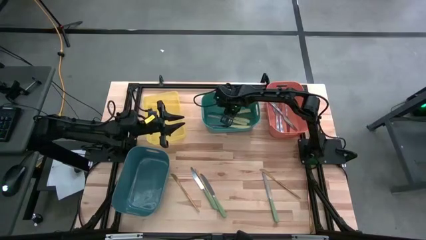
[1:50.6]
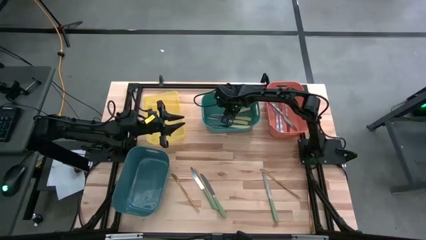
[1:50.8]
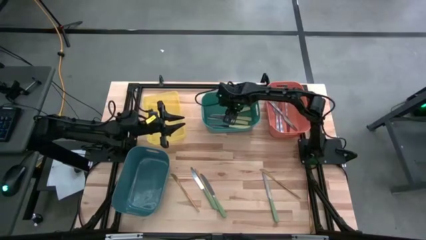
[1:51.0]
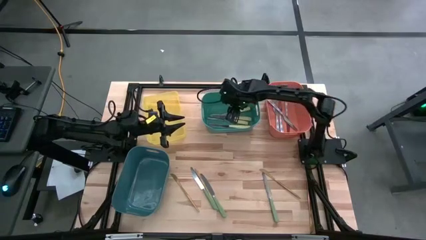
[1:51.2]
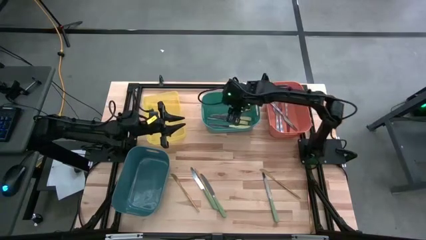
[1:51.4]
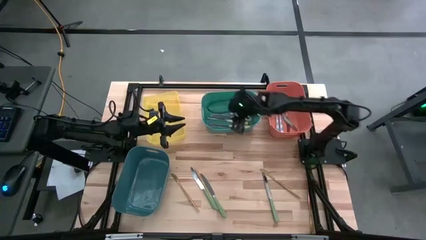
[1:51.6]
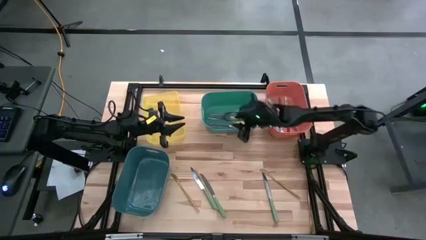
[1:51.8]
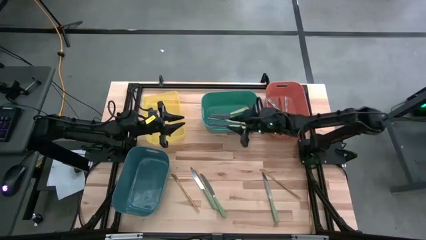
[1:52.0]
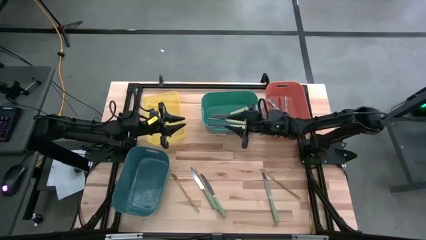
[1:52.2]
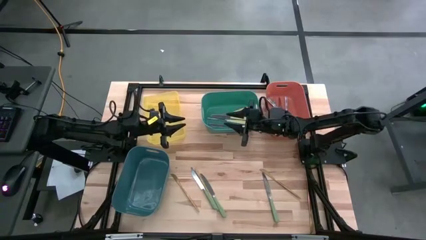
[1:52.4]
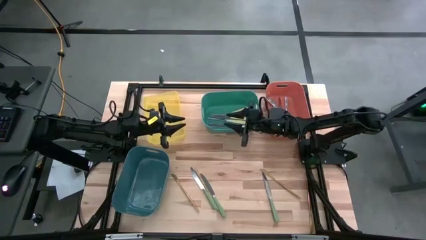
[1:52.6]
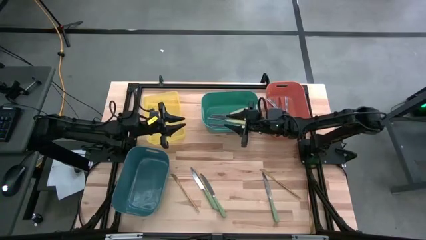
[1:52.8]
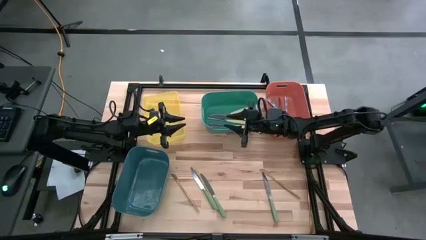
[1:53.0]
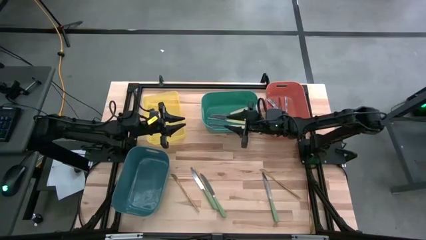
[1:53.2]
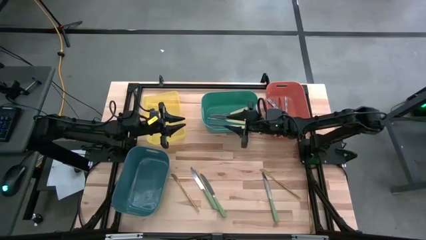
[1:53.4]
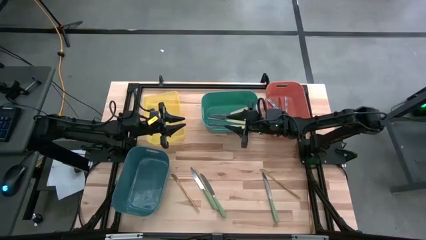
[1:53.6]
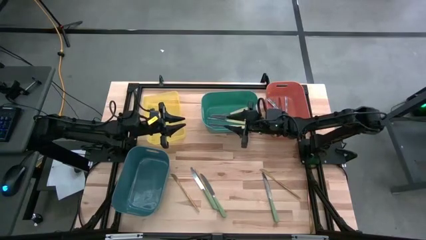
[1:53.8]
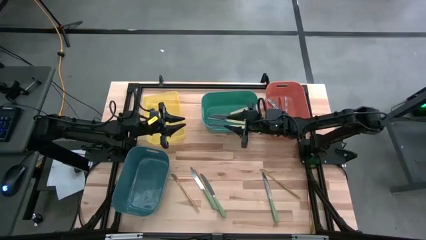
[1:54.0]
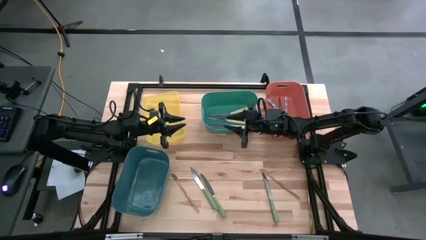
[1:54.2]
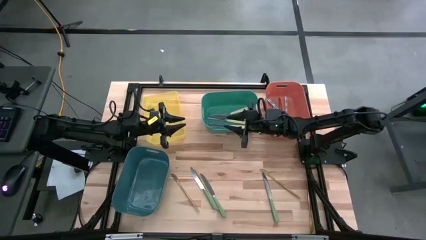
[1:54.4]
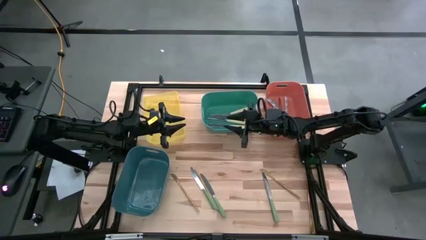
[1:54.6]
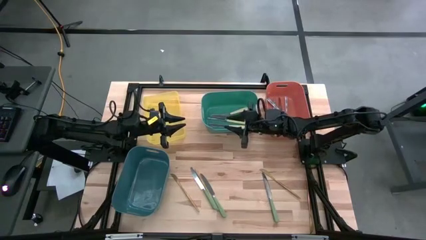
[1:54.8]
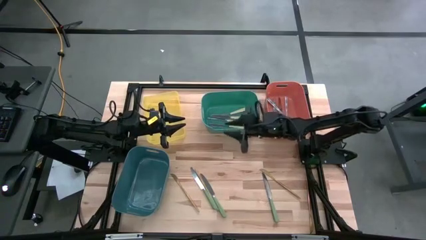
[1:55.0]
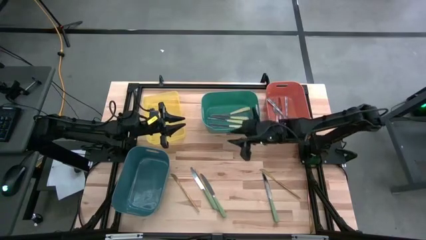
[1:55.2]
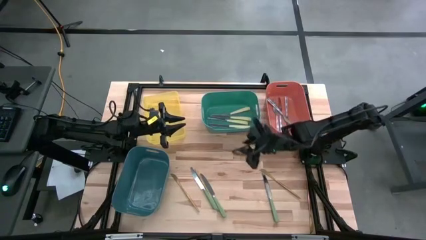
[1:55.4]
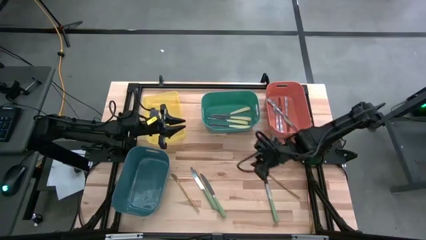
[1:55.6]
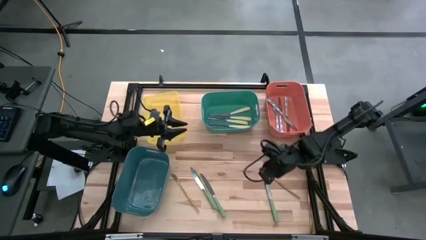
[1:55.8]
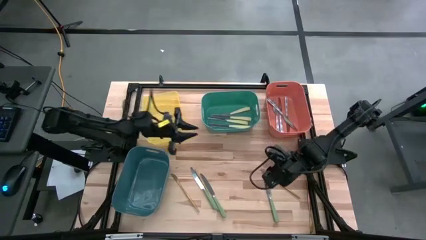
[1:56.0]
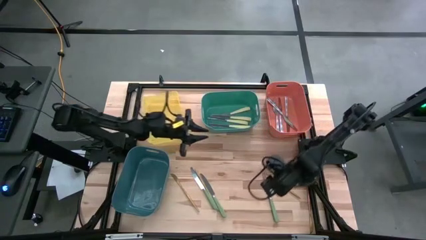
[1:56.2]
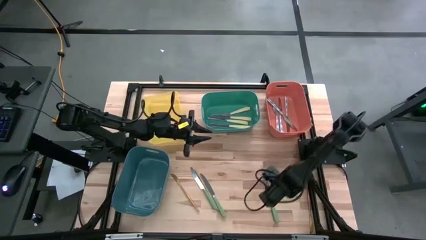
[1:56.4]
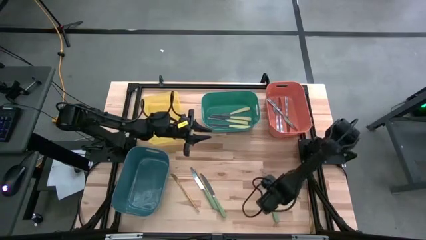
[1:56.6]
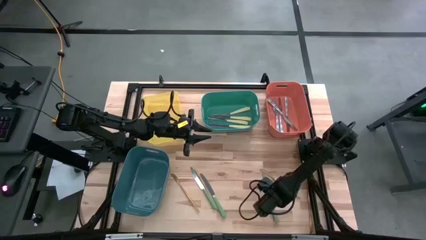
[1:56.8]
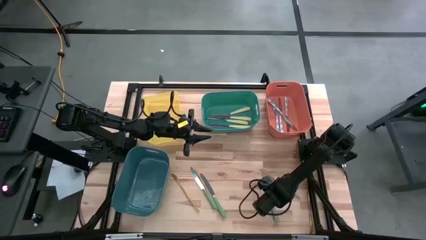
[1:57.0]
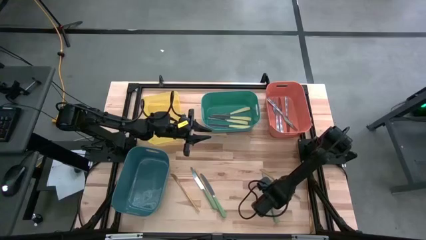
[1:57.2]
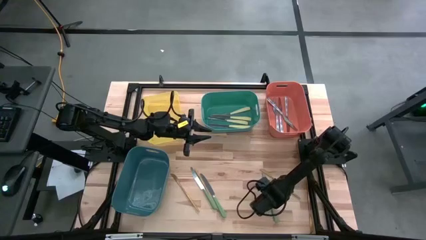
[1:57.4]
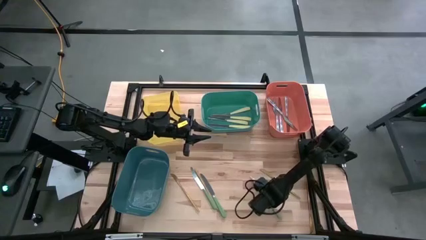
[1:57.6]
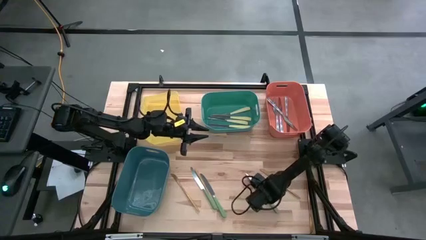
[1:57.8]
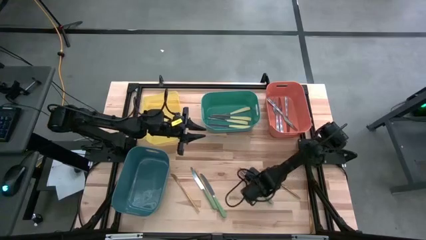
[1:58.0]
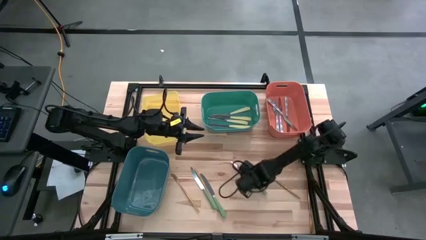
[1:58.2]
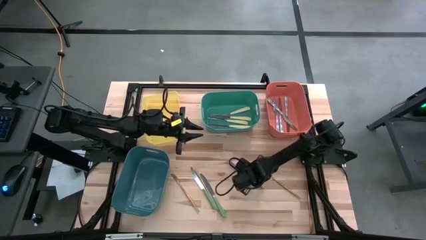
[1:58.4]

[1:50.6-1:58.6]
Task: Sort silverware by color (type)
Put the green knife into the yellow bin
